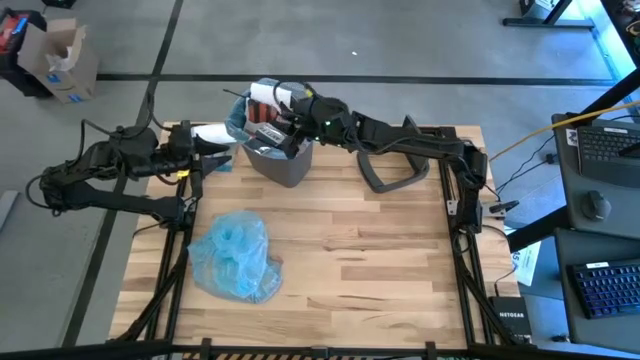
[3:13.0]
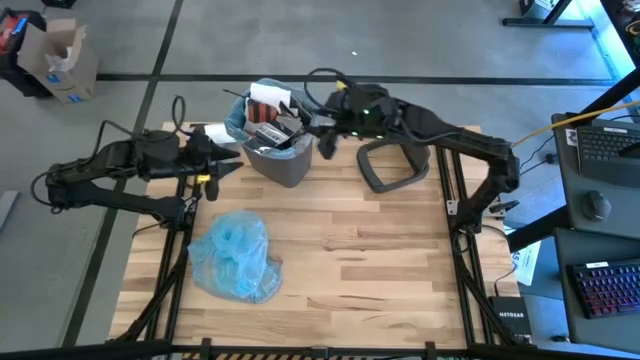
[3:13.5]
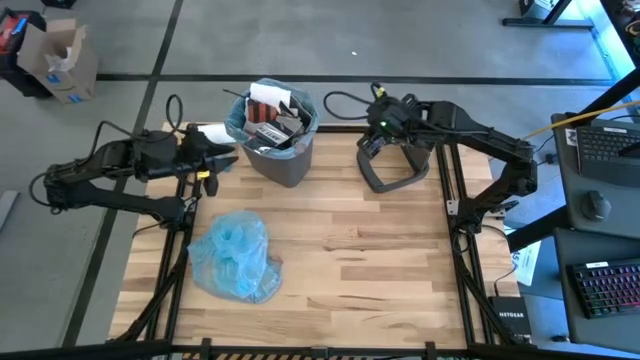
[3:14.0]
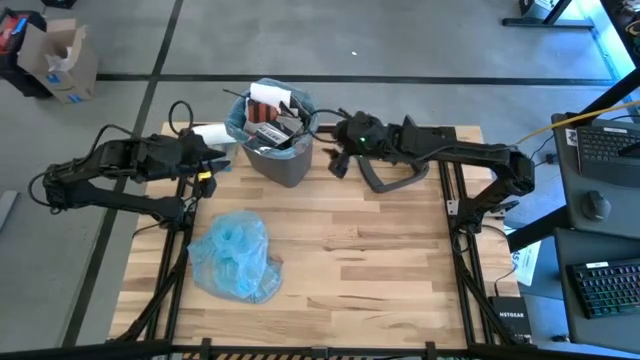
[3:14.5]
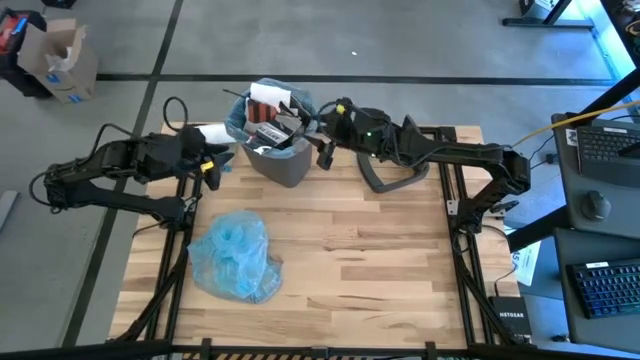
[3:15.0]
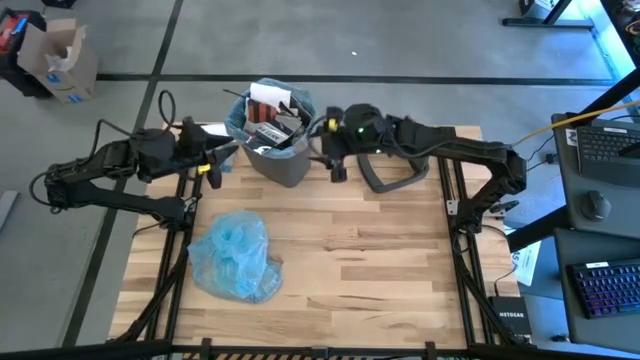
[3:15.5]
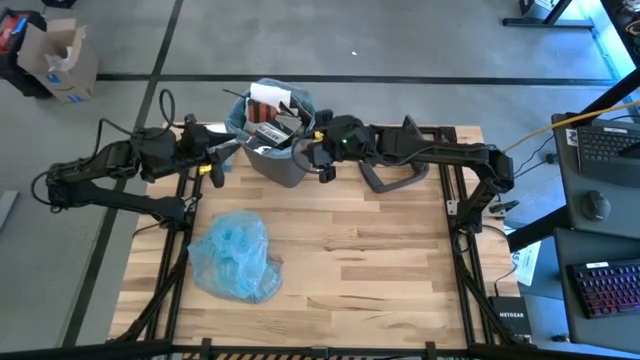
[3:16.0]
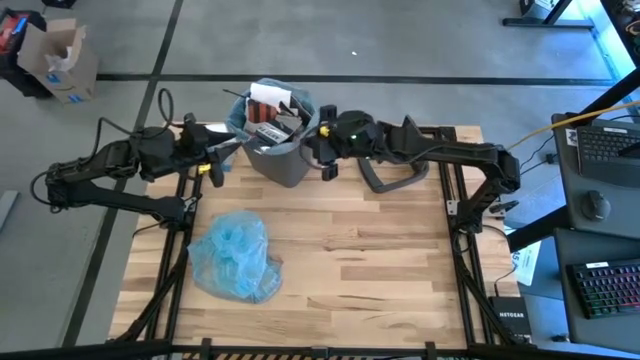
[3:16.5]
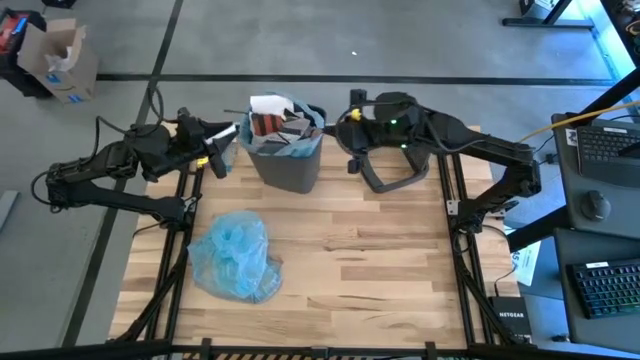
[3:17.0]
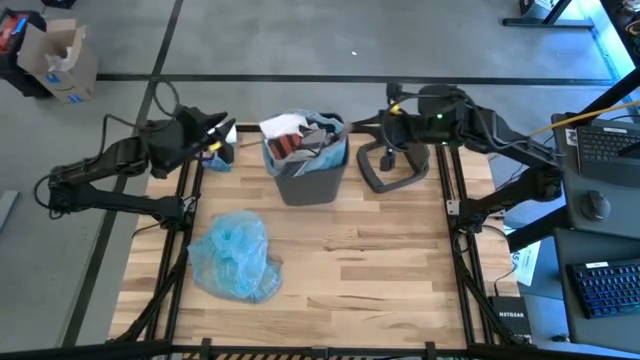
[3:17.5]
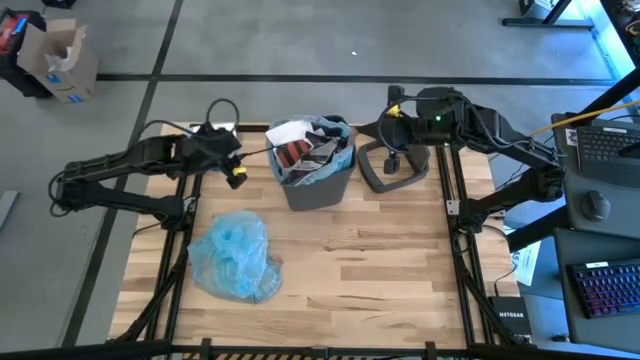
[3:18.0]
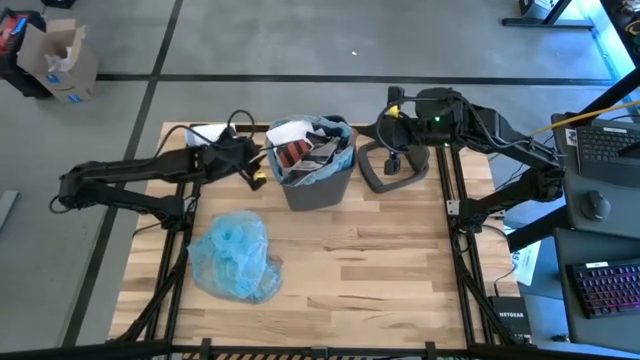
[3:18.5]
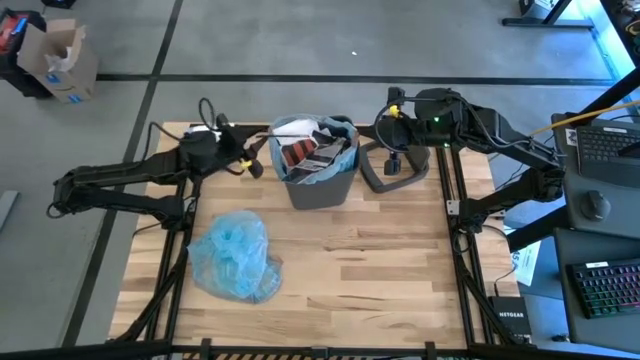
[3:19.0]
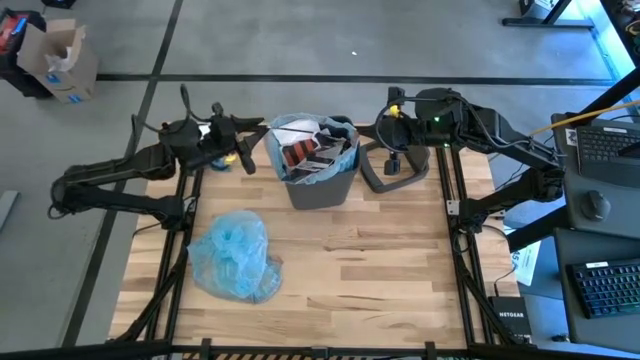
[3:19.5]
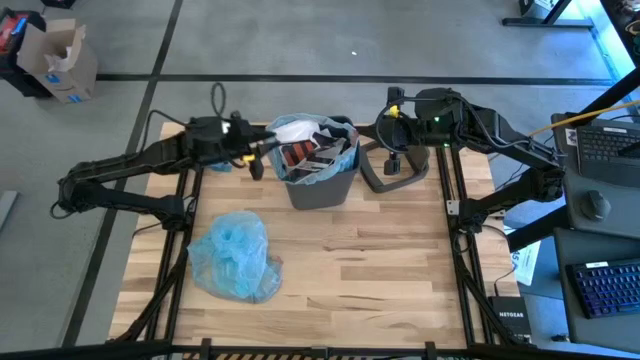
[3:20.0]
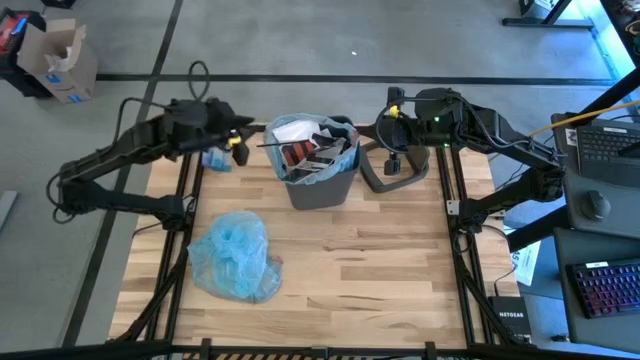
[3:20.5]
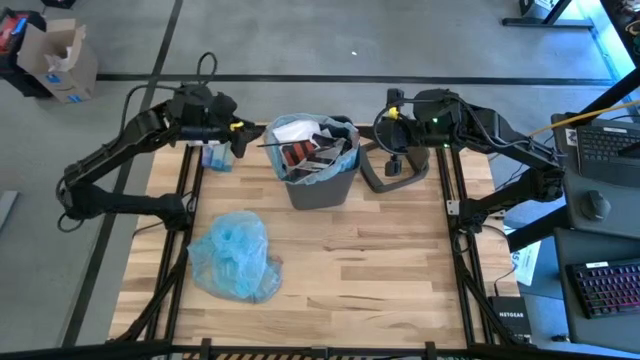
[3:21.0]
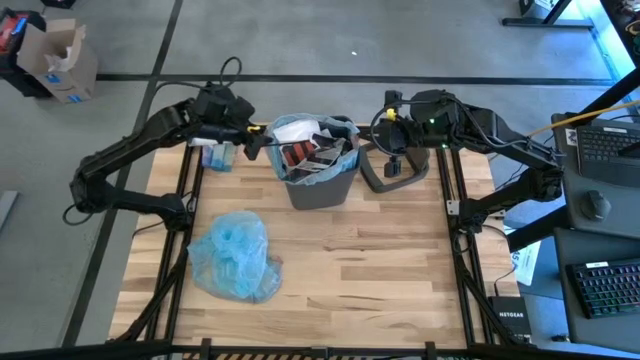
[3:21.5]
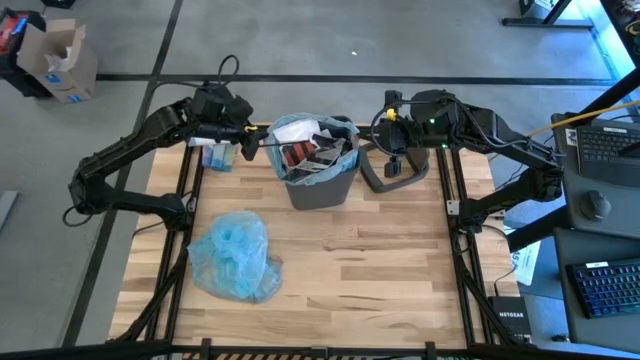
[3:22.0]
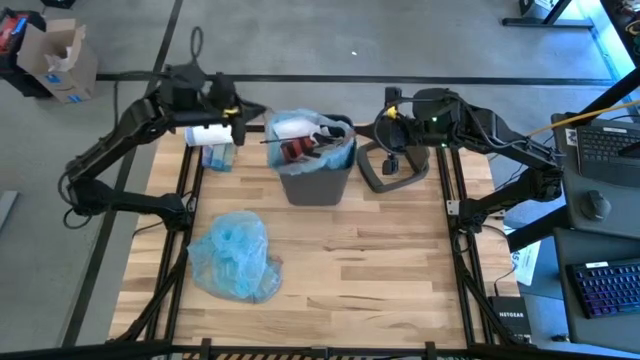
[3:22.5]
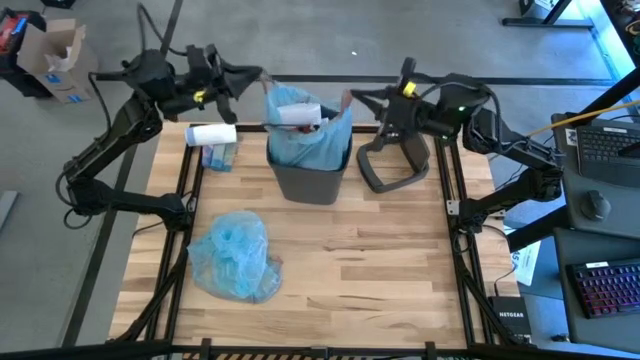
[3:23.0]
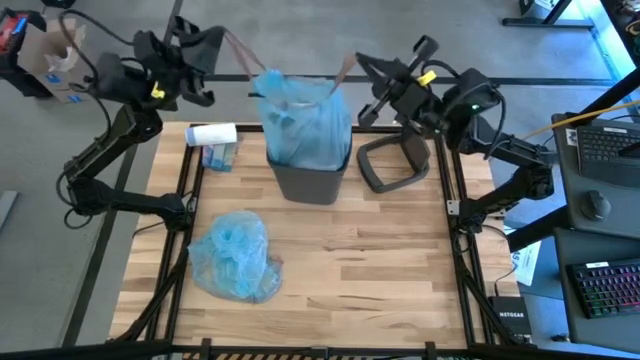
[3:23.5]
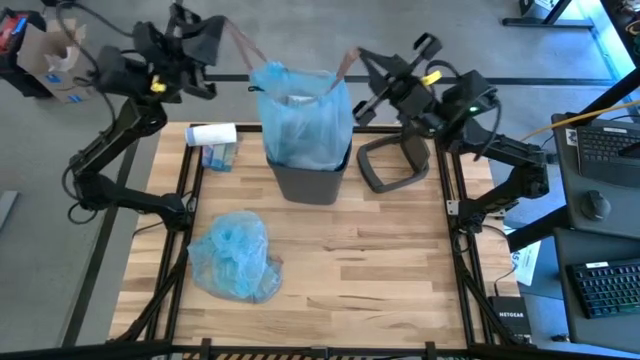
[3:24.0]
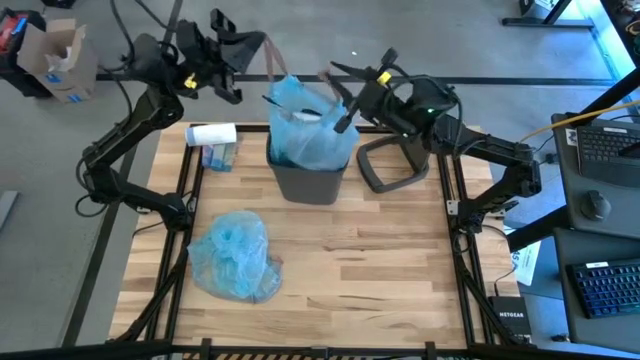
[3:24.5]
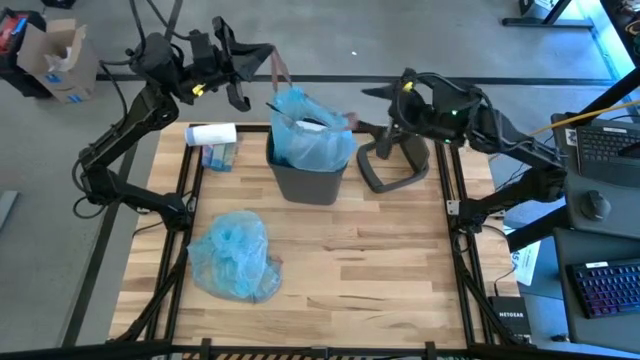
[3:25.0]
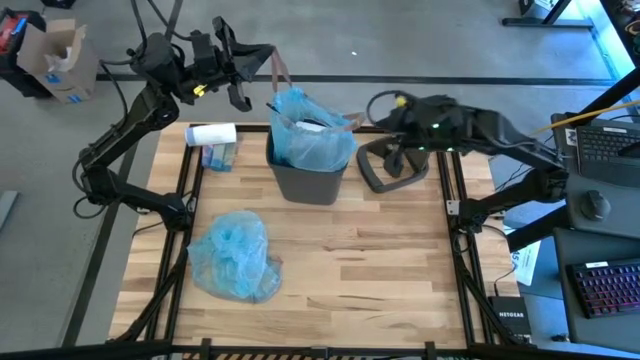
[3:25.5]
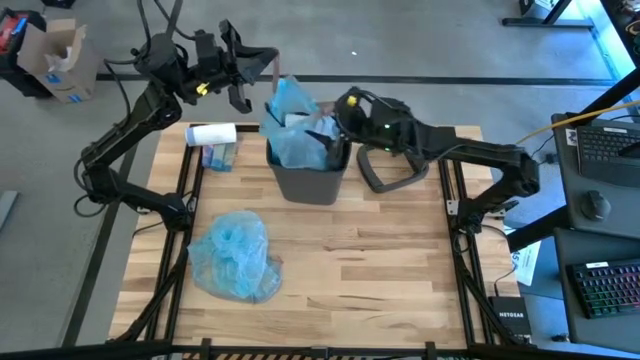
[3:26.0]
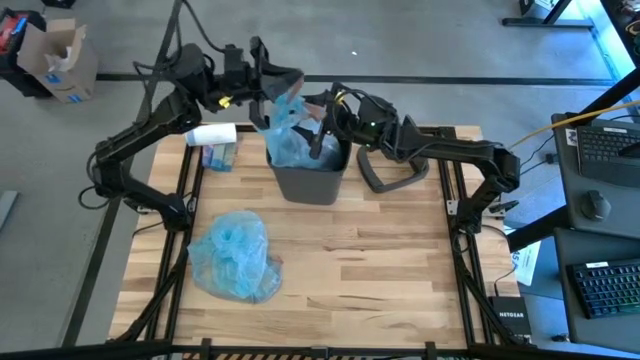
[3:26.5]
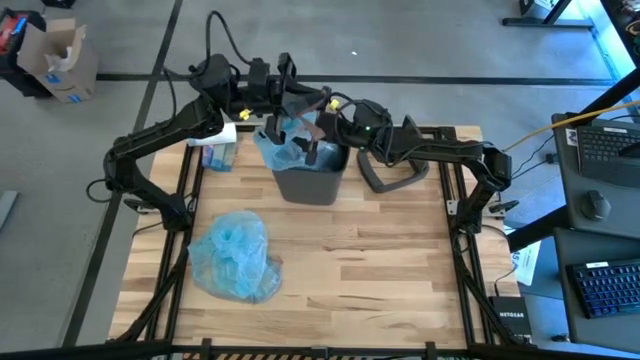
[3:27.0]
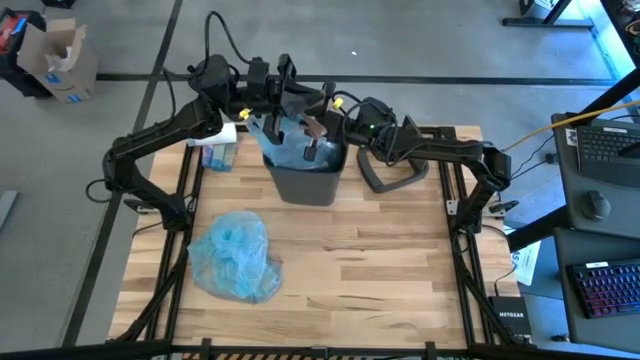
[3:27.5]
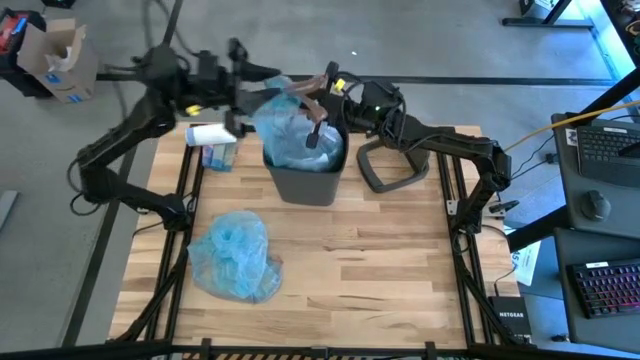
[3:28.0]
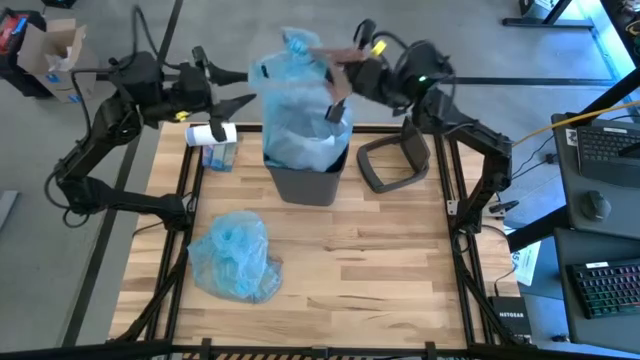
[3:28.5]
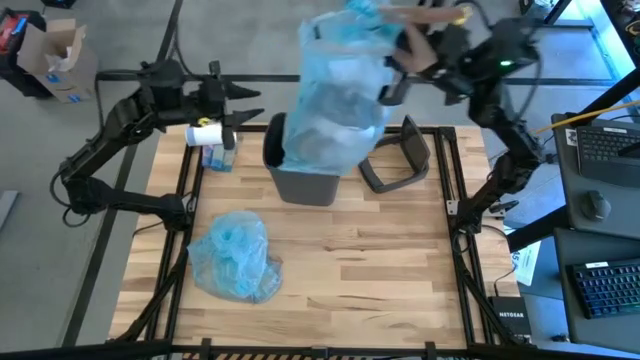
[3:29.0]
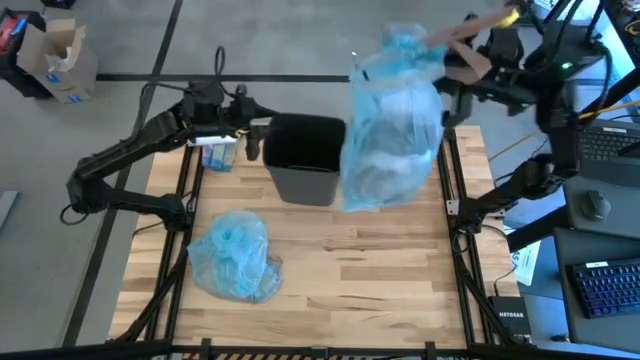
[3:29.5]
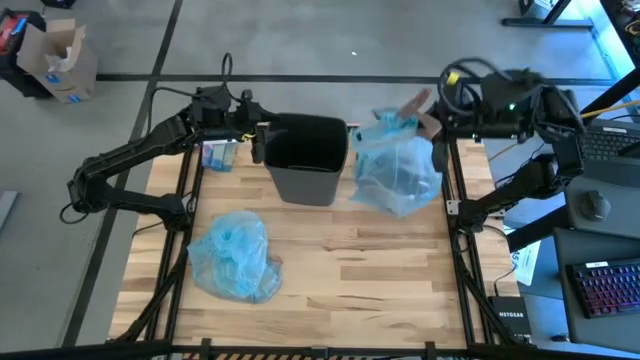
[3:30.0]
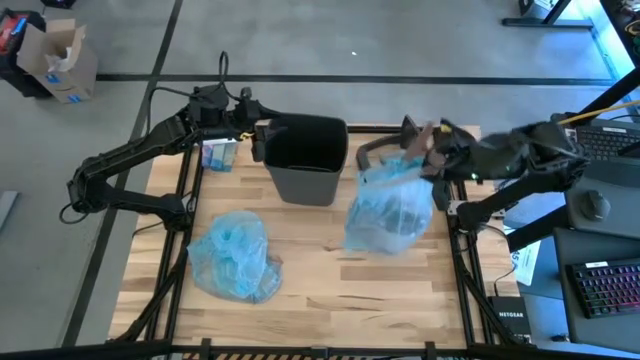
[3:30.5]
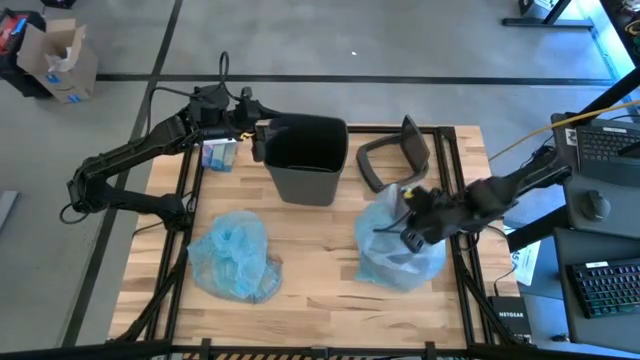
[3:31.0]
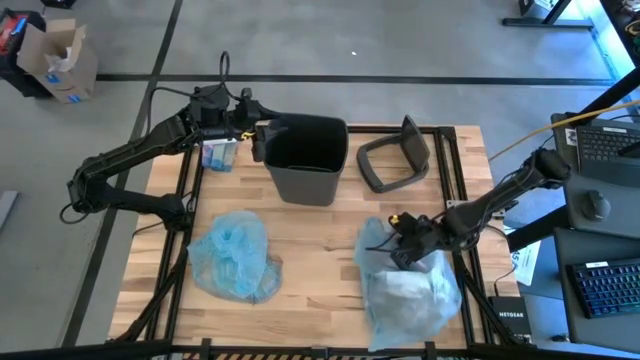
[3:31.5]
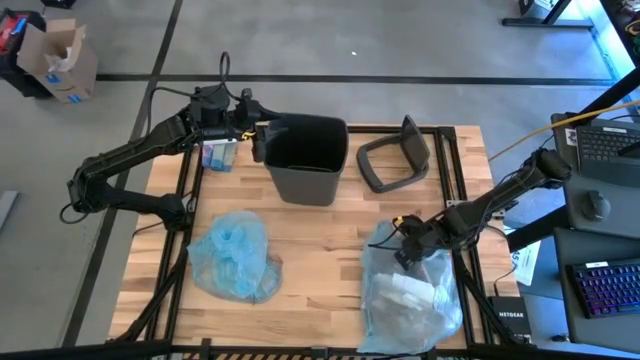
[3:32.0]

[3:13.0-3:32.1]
Task: Pick and place trash into bin
Remove the trash bag from the trash bin

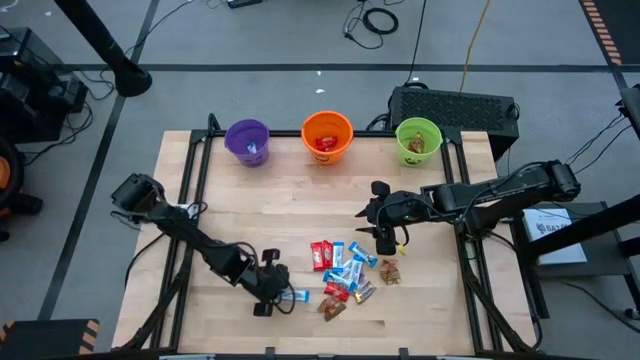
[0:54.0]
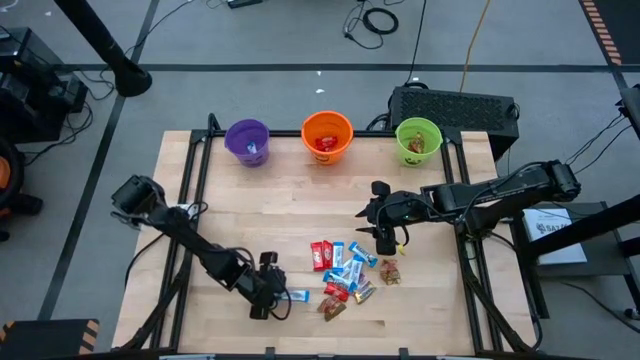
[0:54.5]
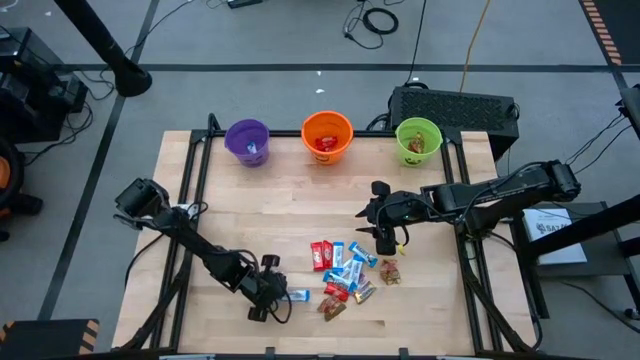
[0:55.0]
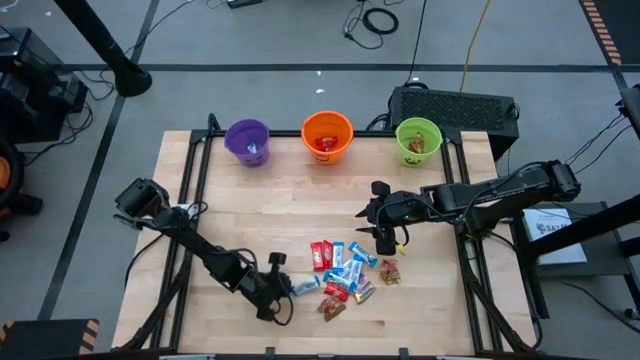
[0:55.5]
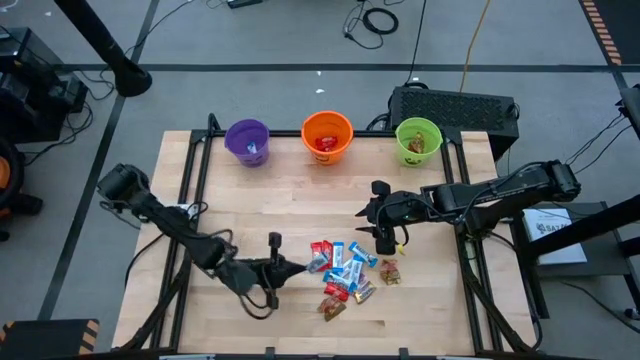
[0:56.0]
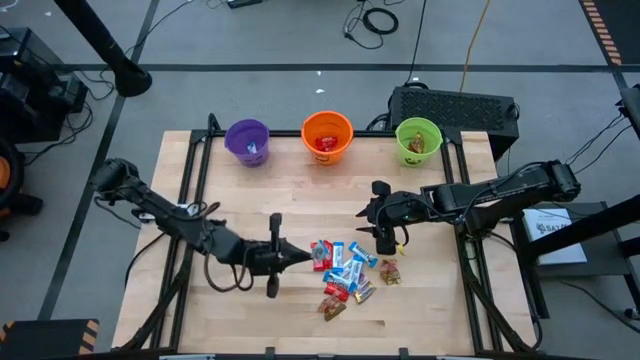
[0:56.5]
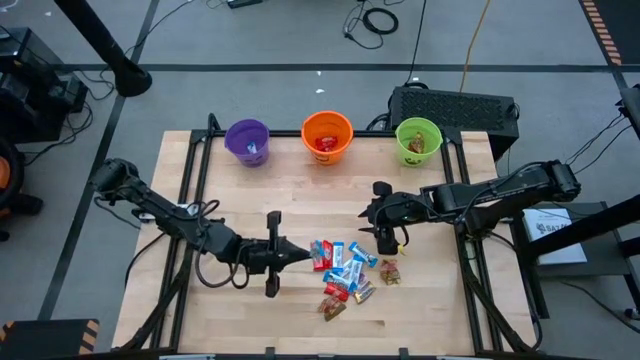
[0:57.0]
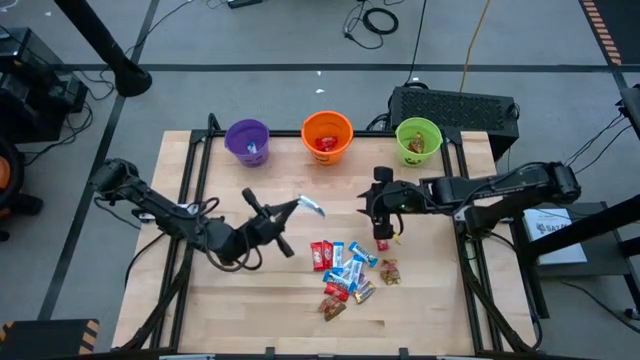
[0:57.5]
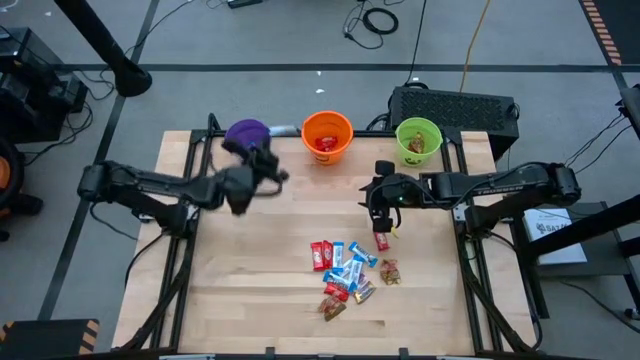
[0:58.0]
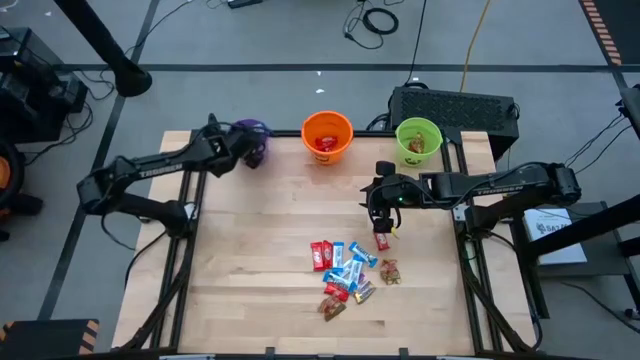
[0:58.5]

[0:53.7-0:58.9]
Task: Sort candy by brand, put in halloween buckets
Put the white chocolate into the purple bucket
